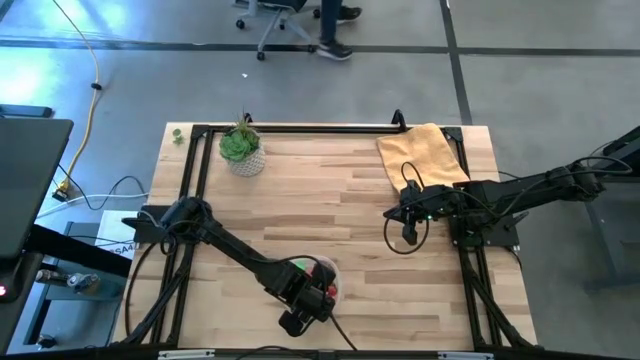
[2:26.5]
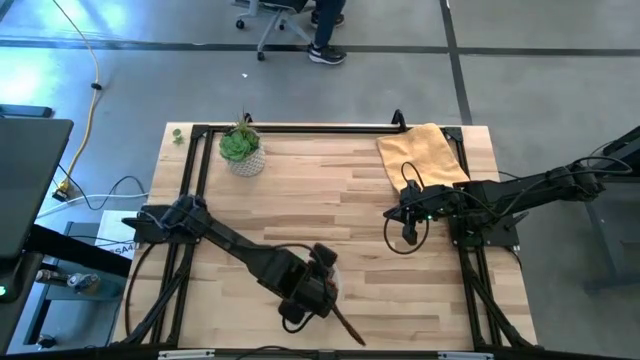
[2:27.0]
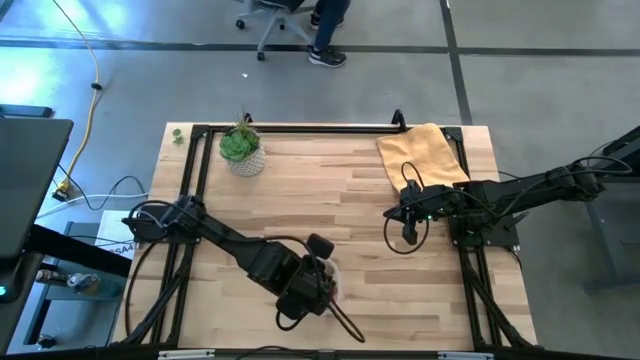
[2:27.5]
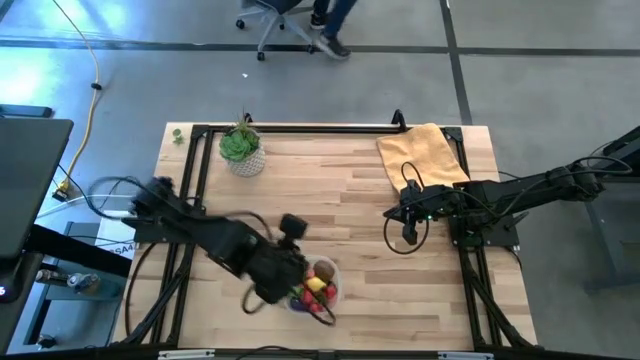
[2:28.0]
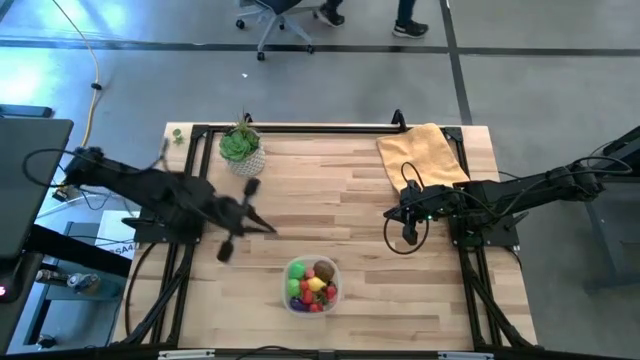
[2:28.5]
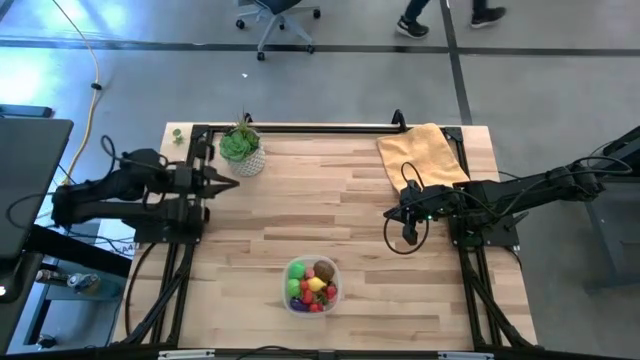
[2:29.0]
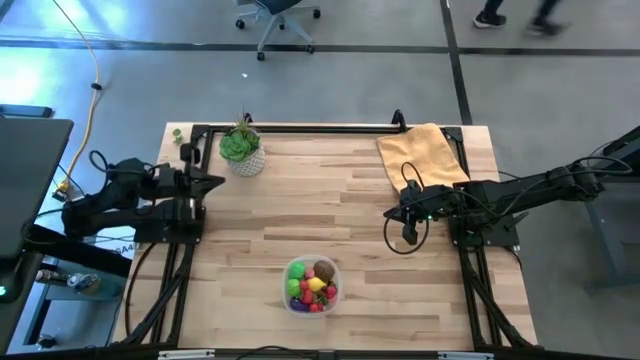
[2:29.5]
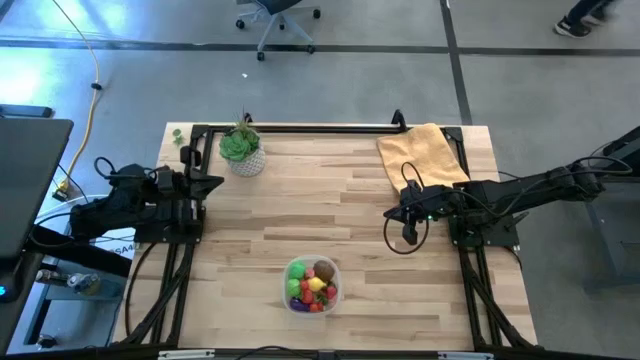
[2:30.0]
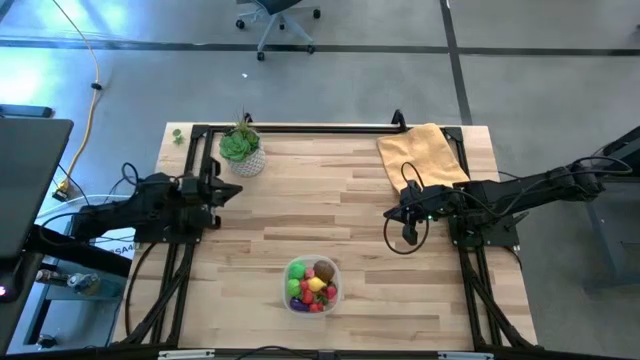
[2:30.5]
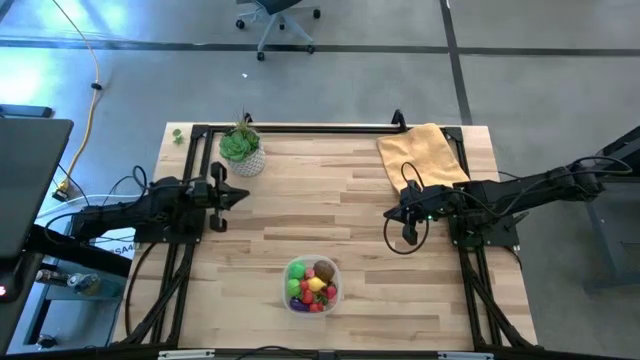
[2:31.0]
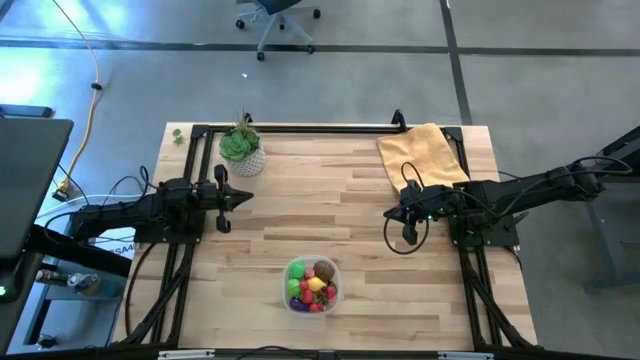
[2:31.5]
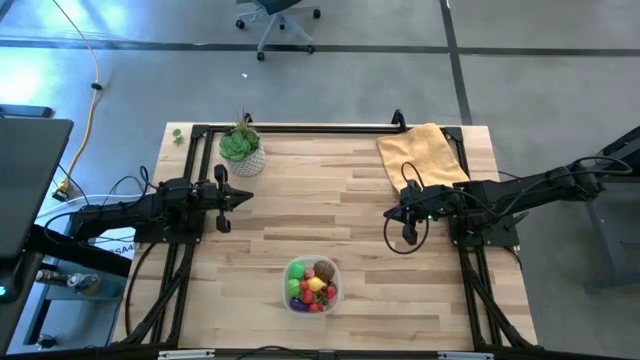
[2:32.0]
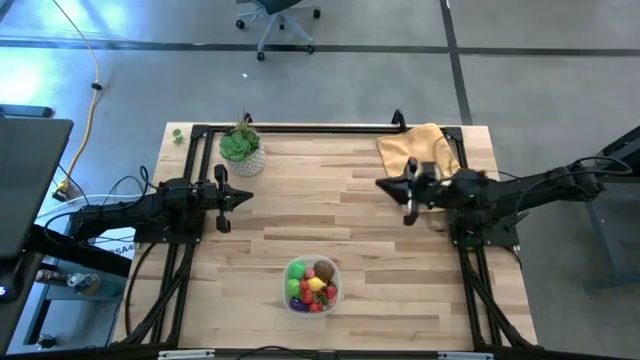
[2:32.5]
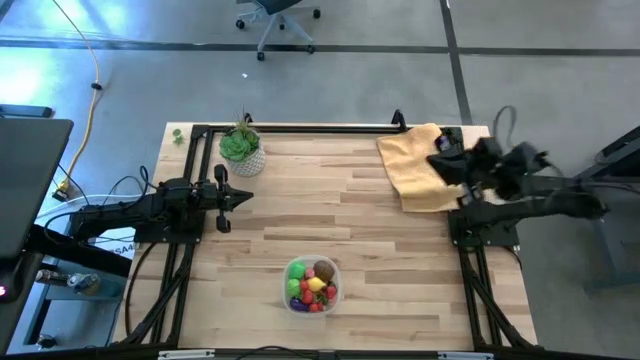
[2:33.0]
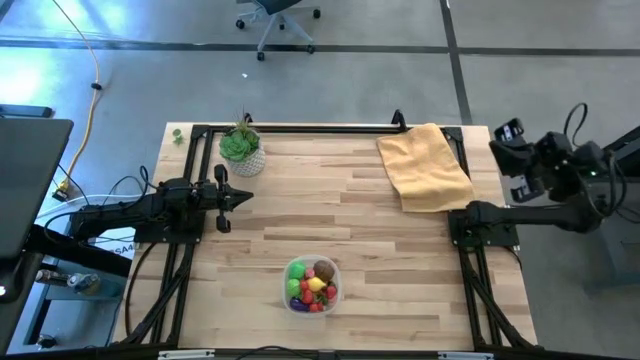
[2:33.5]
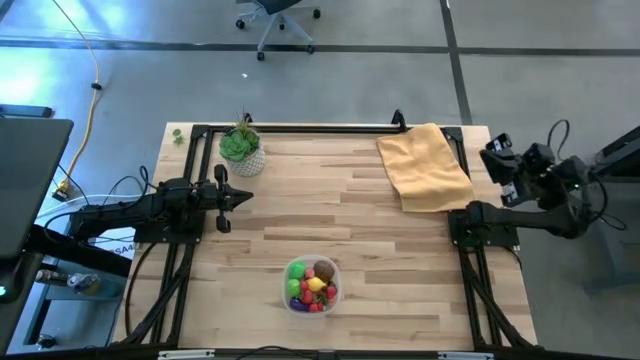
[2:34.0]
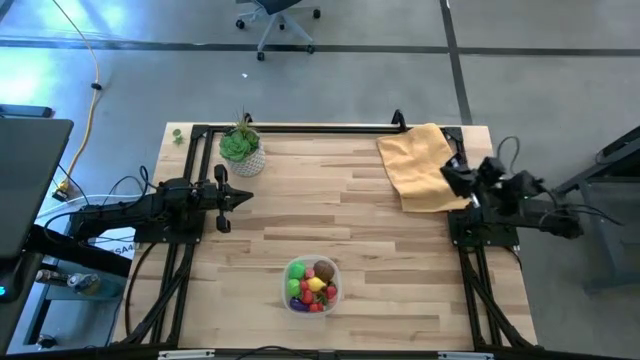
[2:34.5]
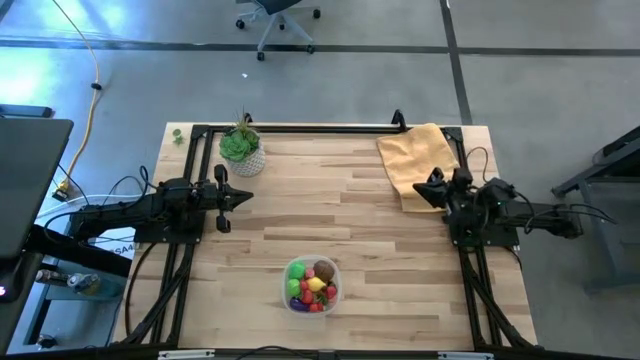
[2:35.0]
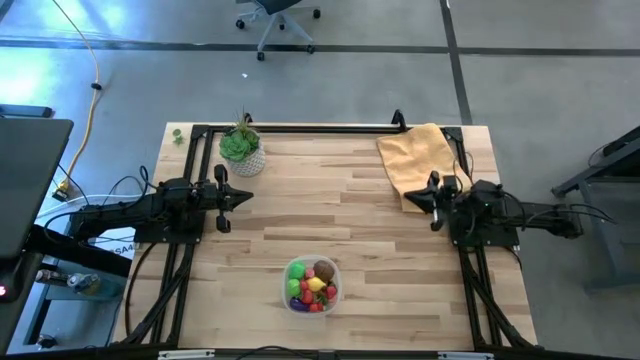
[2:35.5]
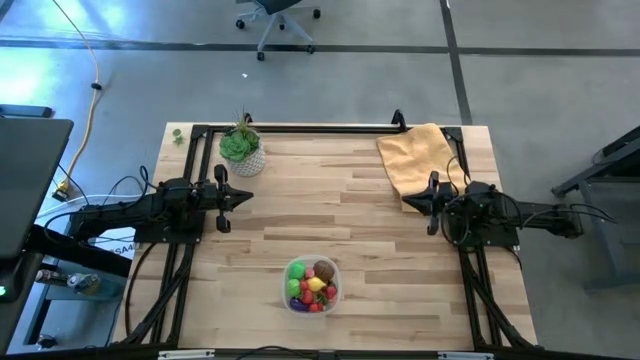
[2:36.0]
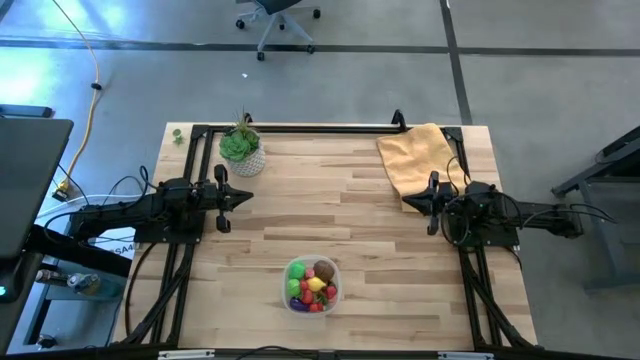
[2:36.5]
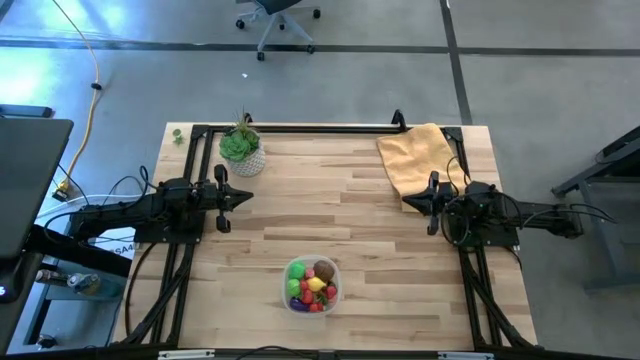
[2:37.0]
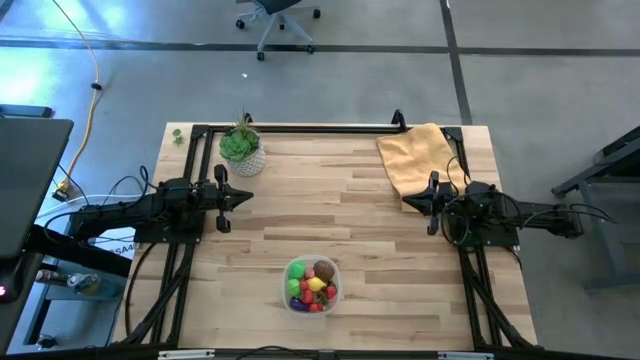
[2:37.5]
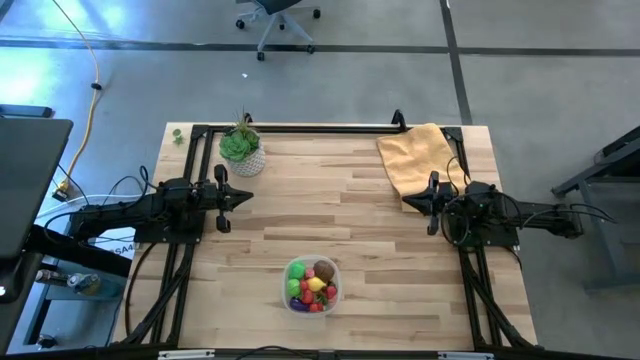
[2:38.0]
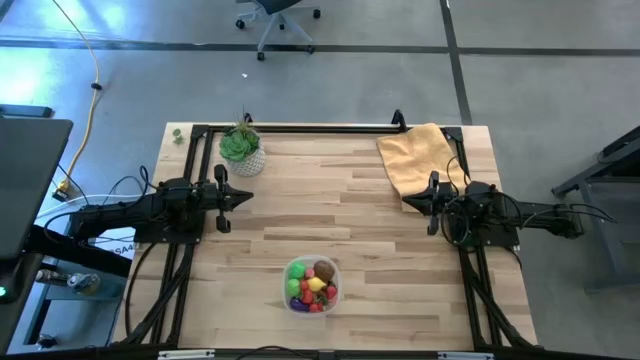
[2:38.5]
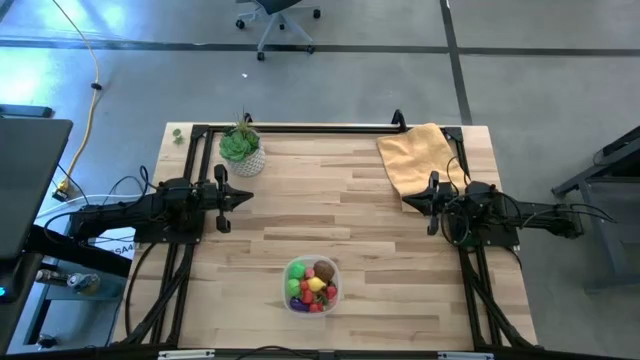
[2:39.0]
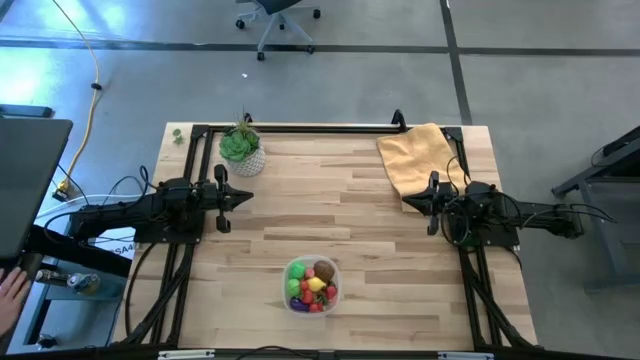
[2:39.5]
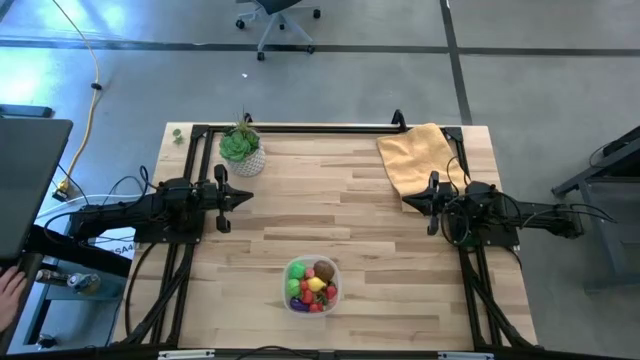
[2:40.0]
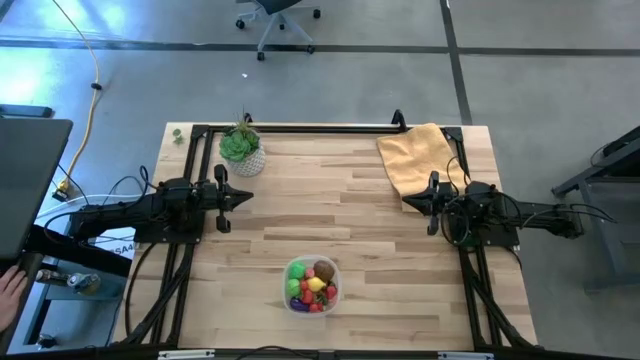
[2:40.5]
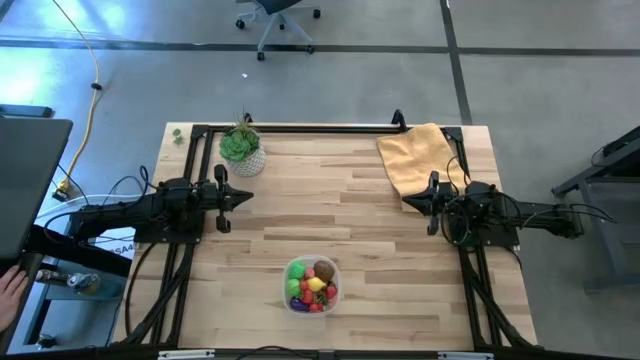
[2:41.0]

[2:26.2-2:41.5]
Task: Pick and placing Produce into tupperware
Return to Home Position

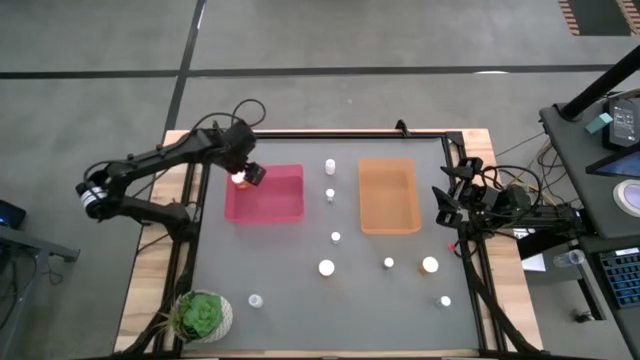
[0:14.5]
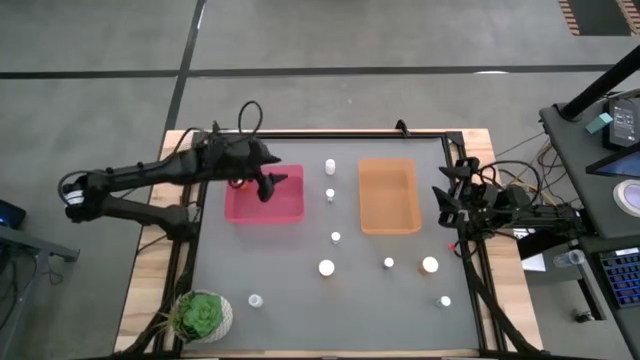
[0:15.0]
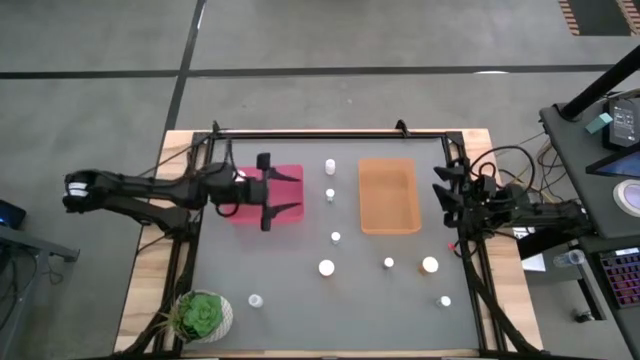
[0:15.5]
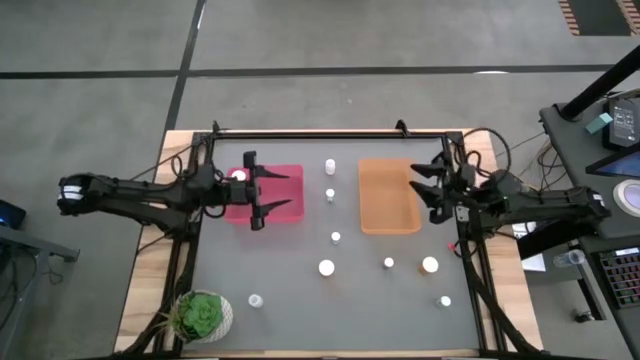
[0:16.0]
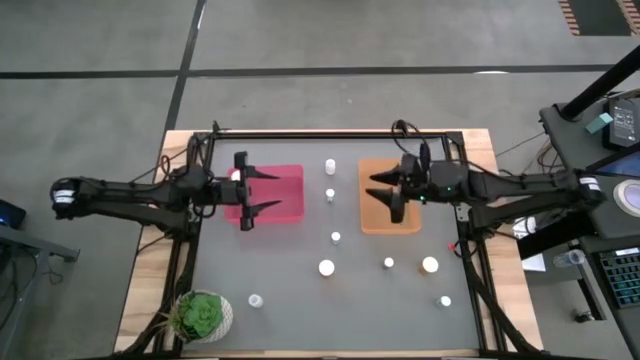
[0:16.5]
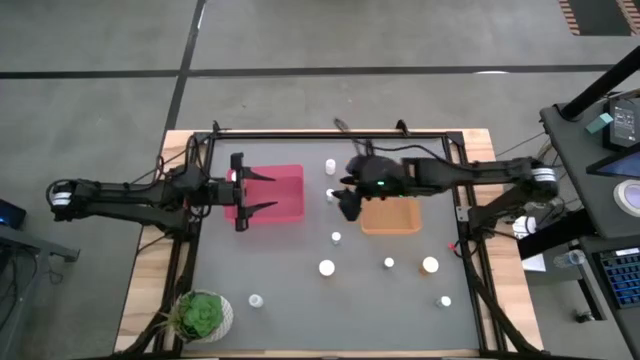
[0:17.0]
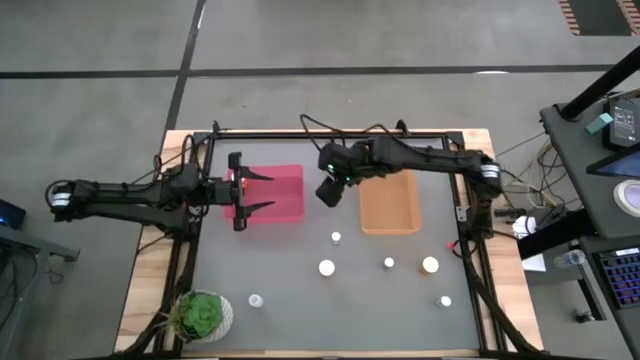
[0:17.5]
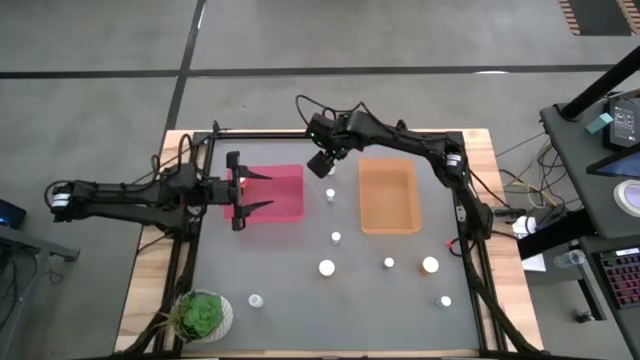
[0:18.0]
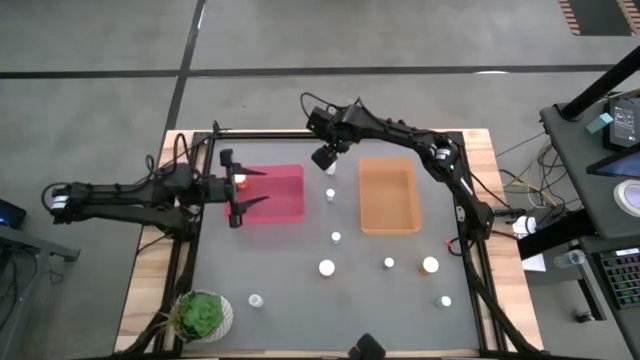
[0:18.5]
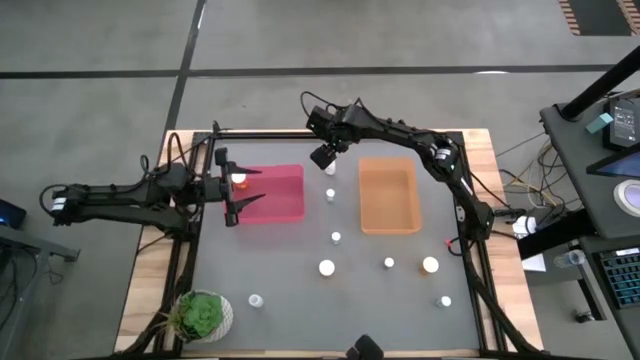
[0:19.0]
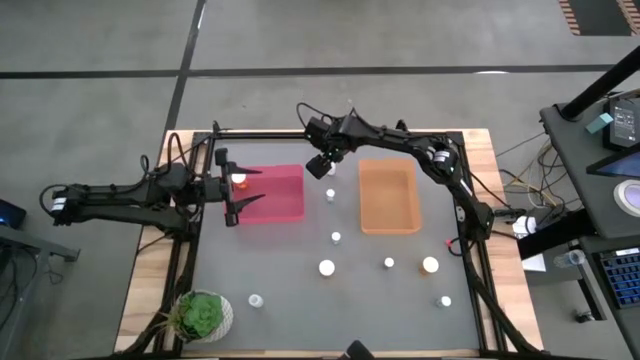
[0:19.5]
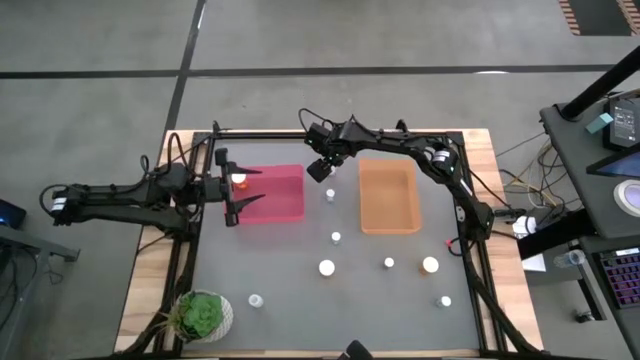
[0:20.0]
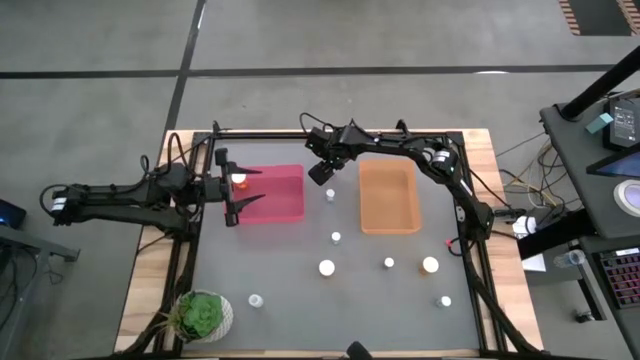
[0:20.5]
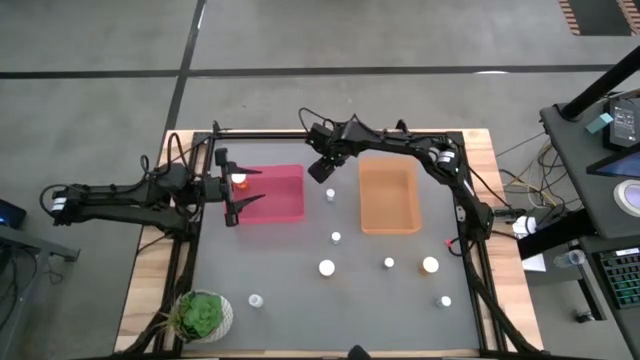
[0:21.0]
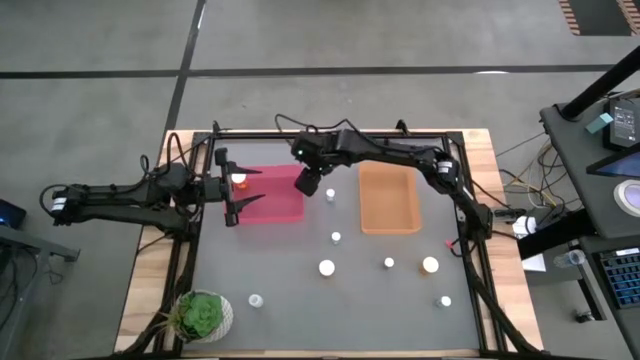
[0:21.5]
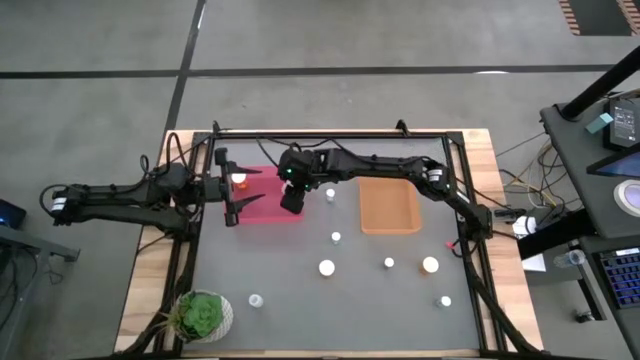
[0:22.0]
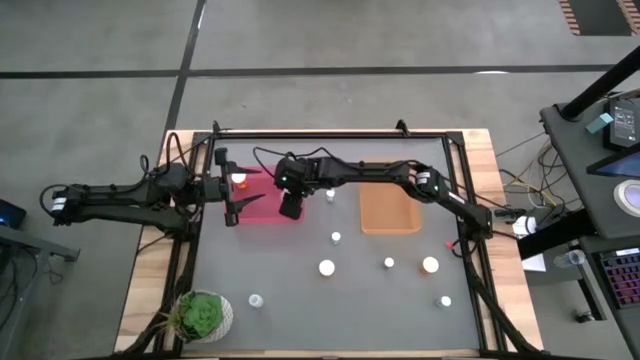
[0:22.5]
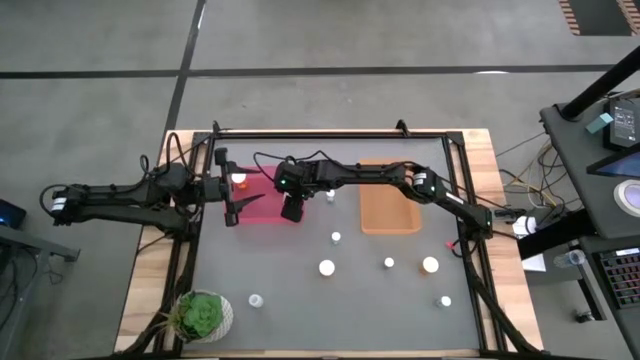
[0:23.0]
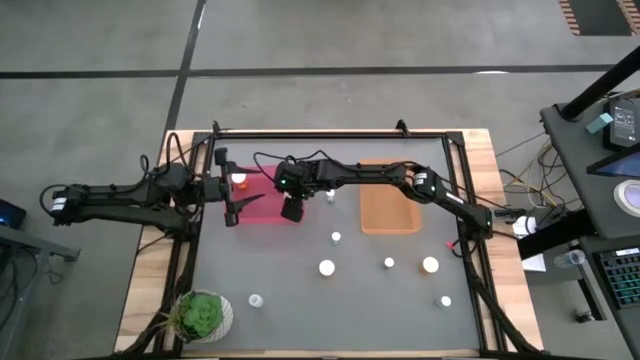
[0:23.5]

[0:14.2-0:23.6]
Task: Pick and place medicine bottles into bin by pill shape (circle, oval)
Put the top white pill into the pink bin
